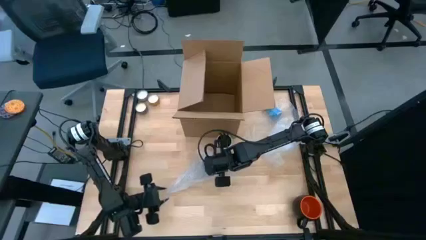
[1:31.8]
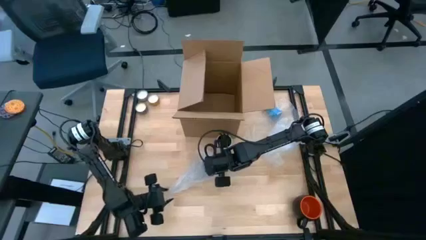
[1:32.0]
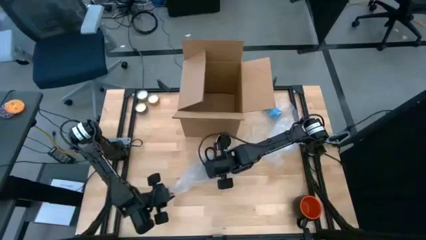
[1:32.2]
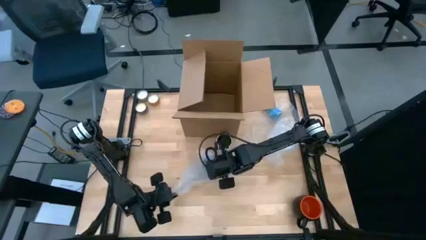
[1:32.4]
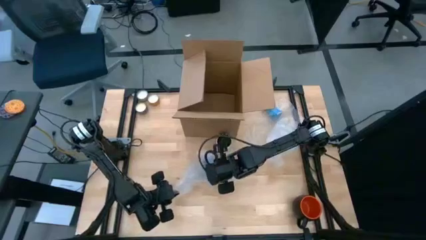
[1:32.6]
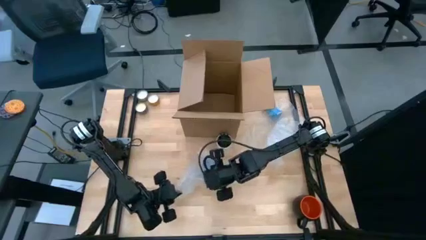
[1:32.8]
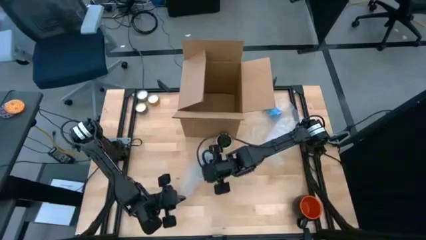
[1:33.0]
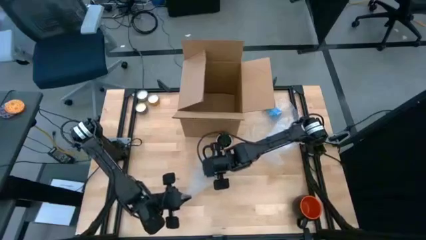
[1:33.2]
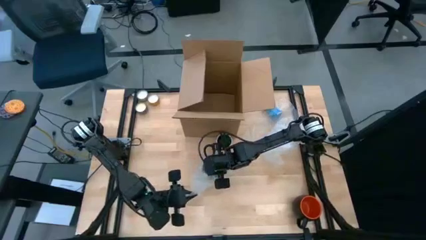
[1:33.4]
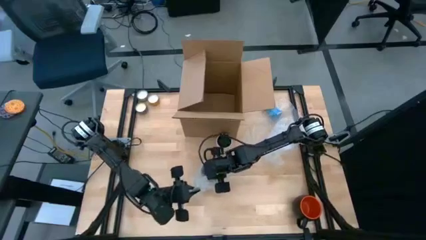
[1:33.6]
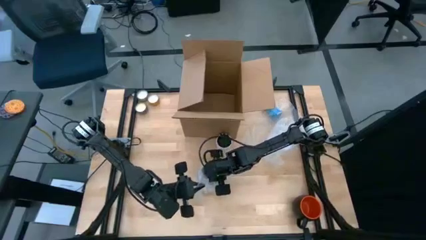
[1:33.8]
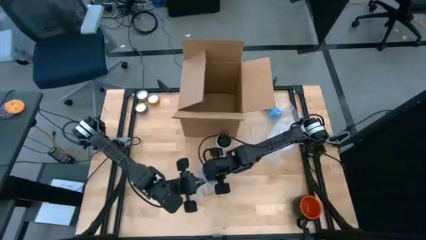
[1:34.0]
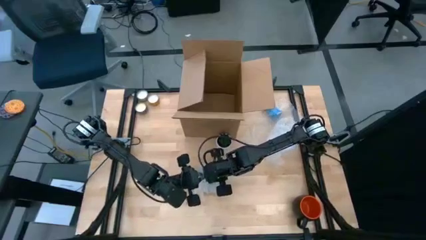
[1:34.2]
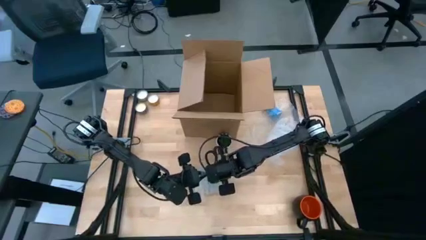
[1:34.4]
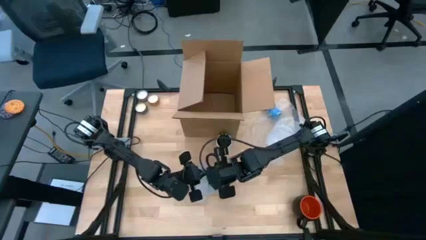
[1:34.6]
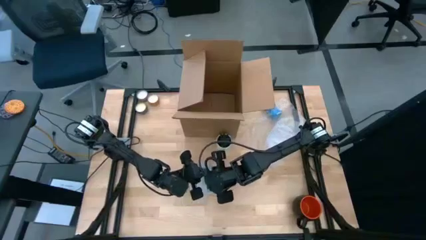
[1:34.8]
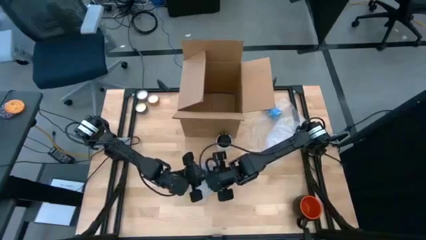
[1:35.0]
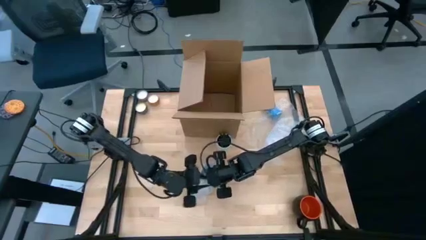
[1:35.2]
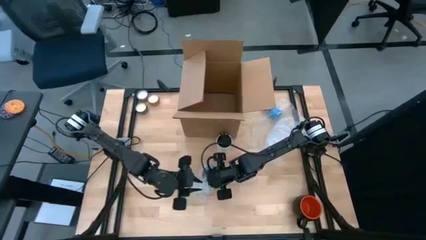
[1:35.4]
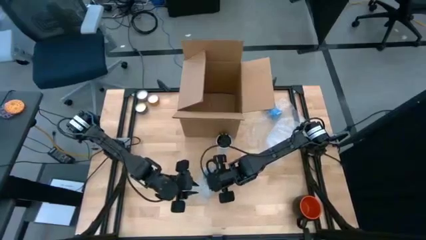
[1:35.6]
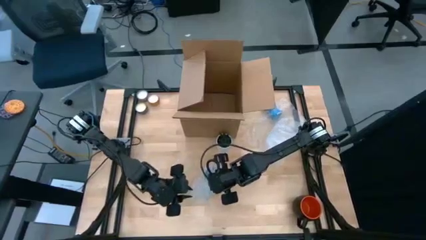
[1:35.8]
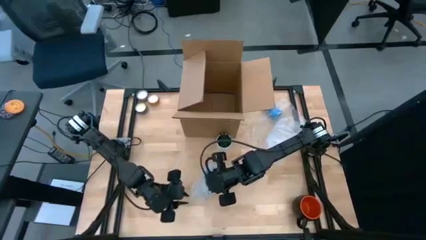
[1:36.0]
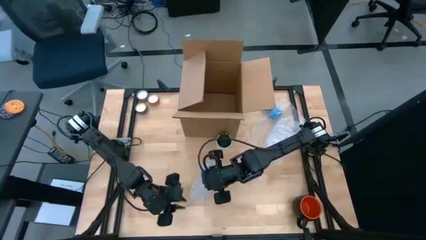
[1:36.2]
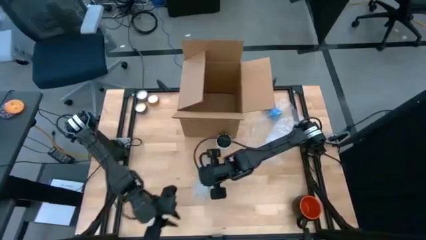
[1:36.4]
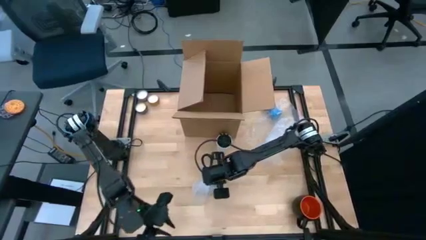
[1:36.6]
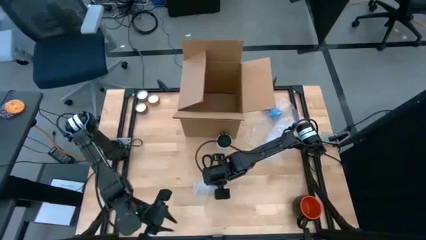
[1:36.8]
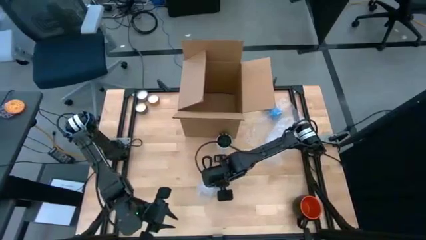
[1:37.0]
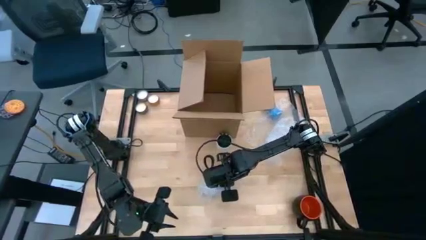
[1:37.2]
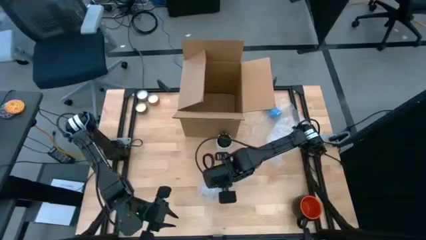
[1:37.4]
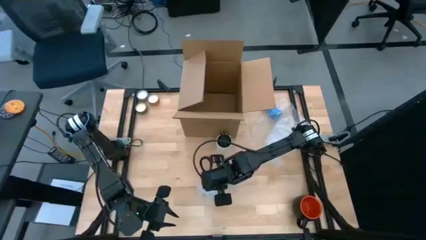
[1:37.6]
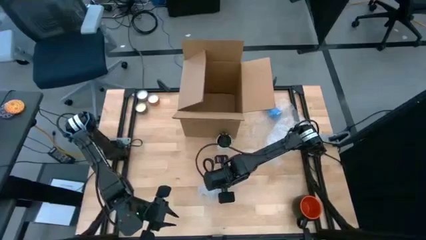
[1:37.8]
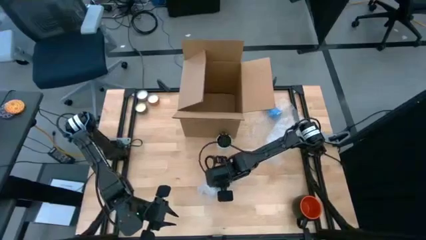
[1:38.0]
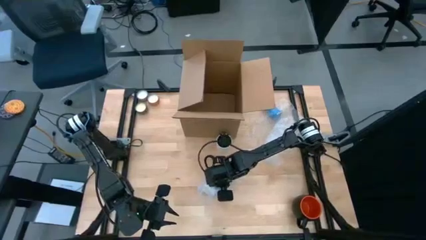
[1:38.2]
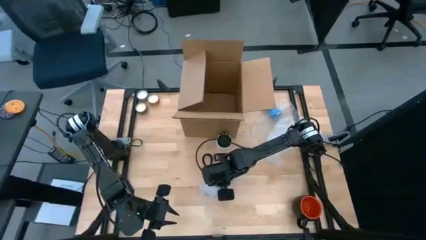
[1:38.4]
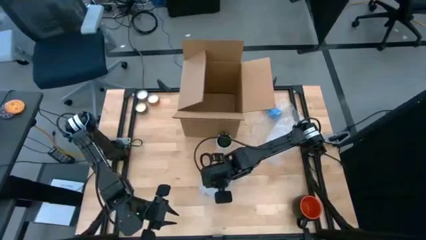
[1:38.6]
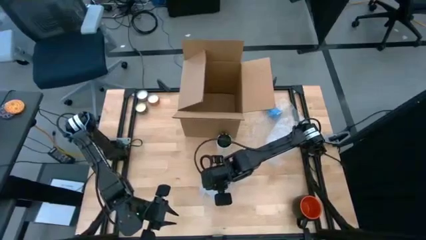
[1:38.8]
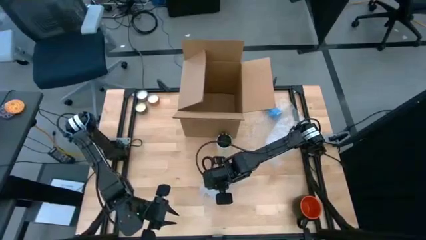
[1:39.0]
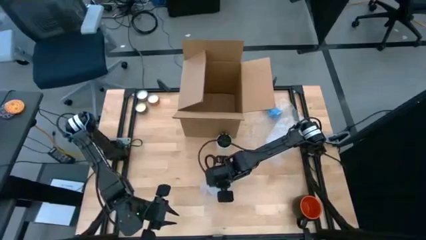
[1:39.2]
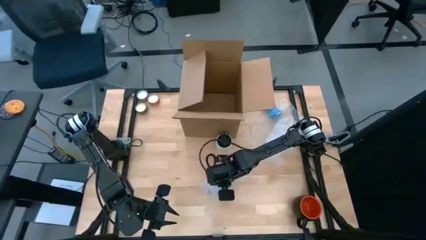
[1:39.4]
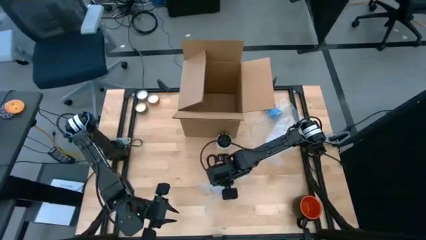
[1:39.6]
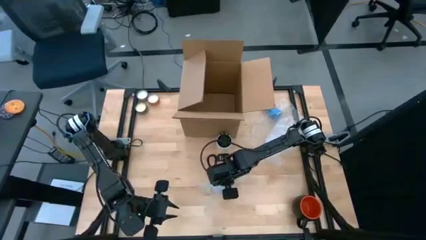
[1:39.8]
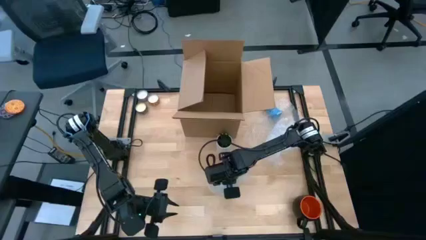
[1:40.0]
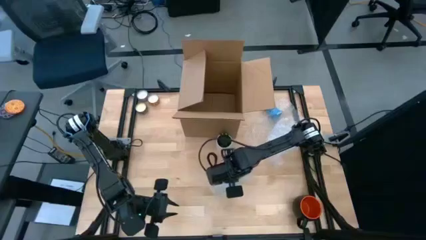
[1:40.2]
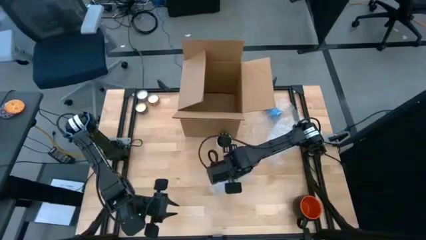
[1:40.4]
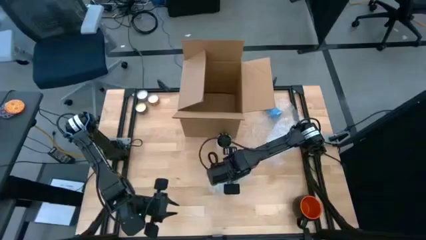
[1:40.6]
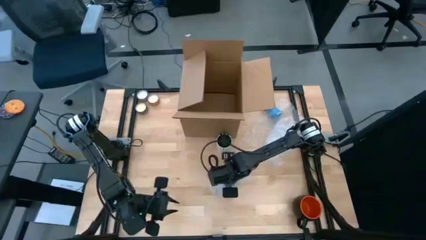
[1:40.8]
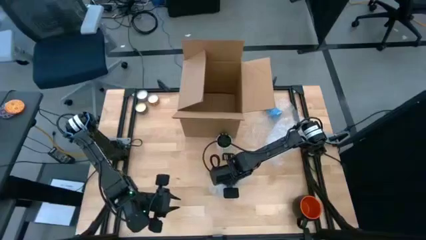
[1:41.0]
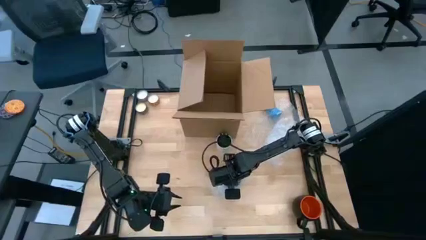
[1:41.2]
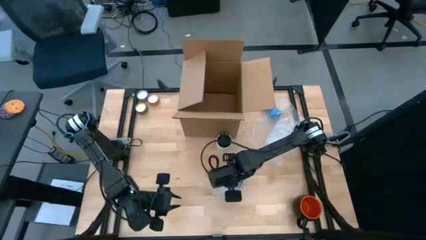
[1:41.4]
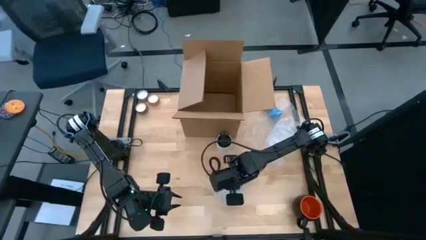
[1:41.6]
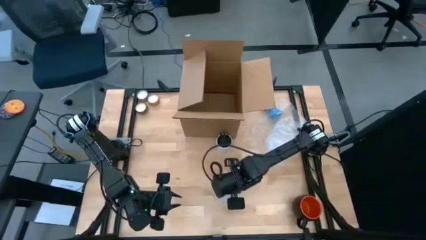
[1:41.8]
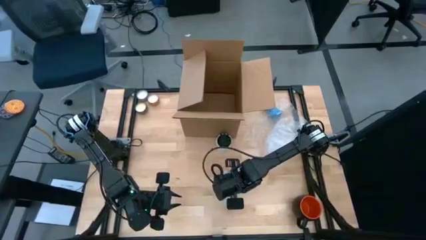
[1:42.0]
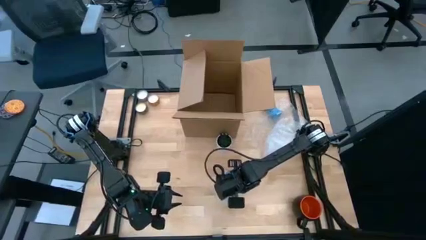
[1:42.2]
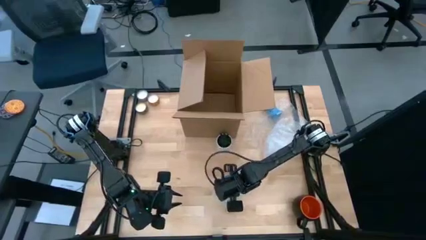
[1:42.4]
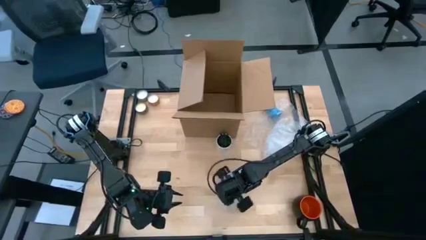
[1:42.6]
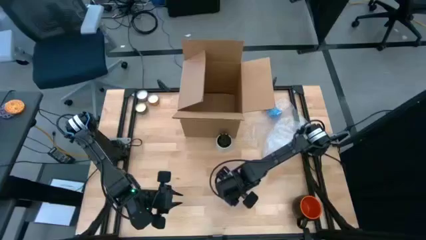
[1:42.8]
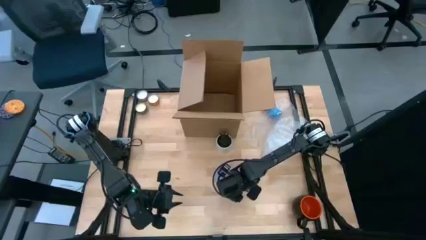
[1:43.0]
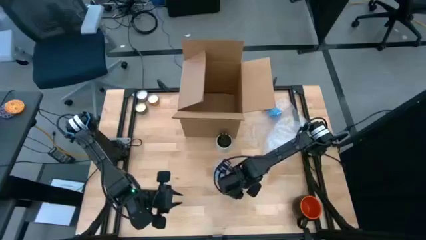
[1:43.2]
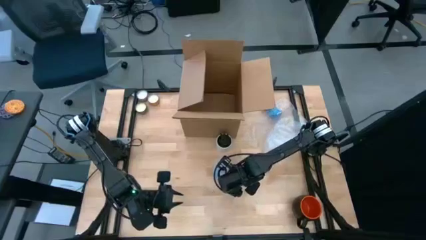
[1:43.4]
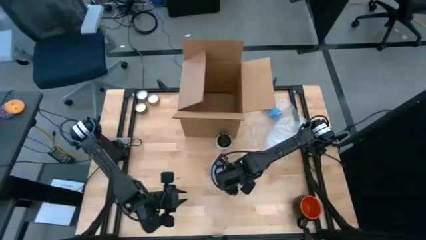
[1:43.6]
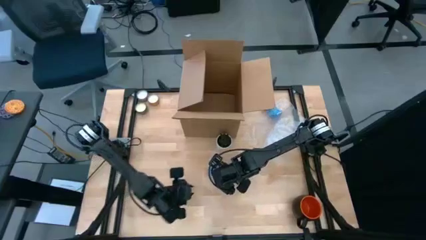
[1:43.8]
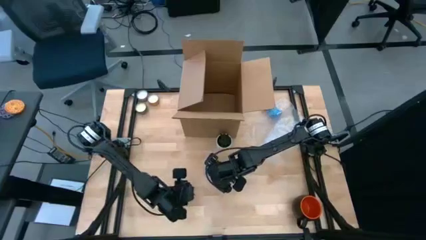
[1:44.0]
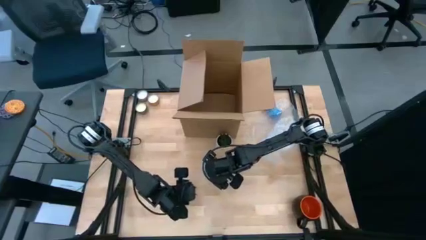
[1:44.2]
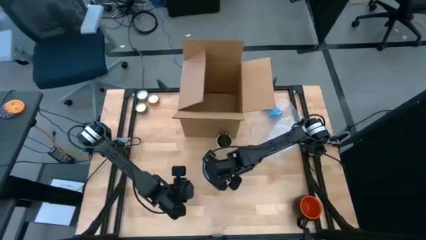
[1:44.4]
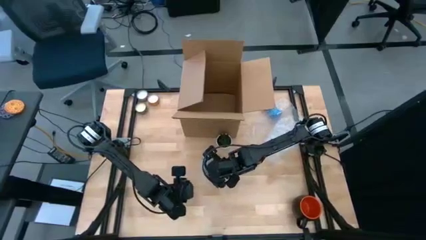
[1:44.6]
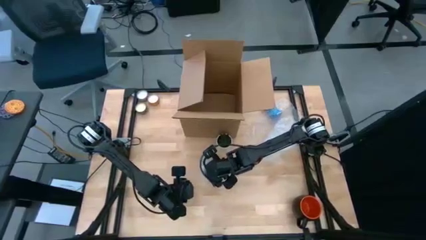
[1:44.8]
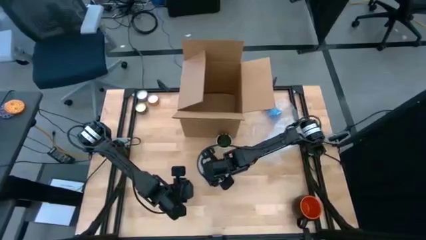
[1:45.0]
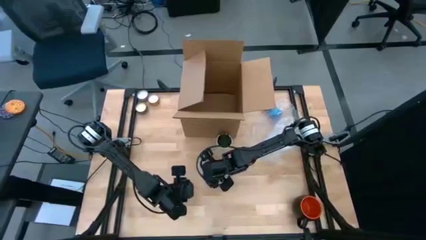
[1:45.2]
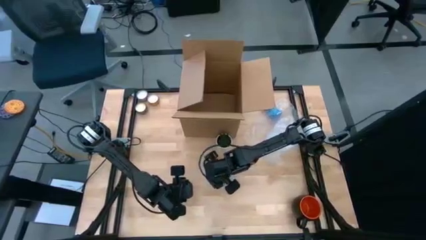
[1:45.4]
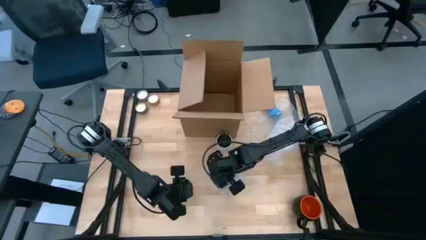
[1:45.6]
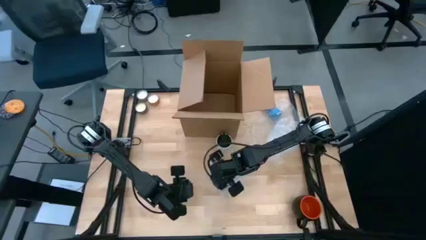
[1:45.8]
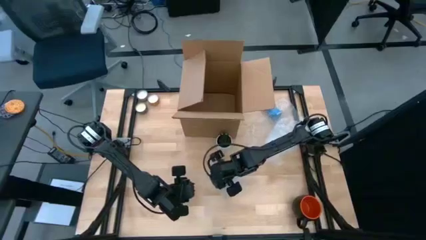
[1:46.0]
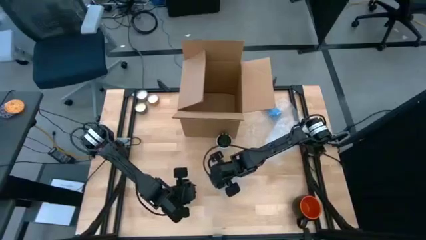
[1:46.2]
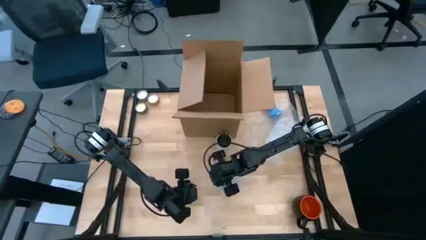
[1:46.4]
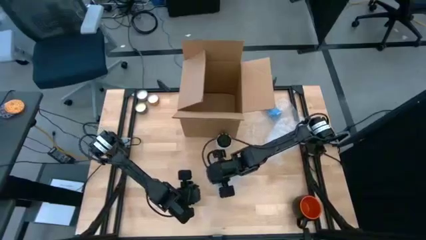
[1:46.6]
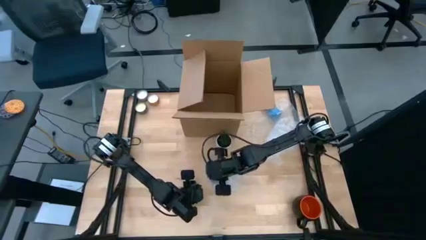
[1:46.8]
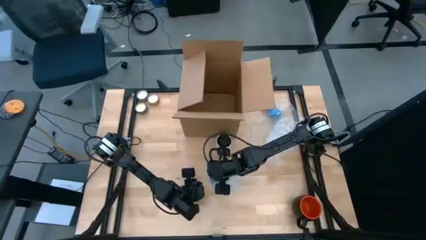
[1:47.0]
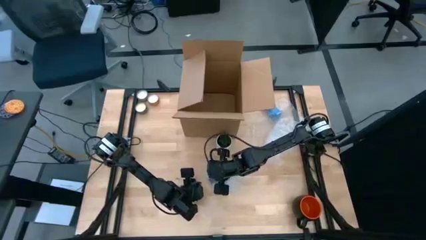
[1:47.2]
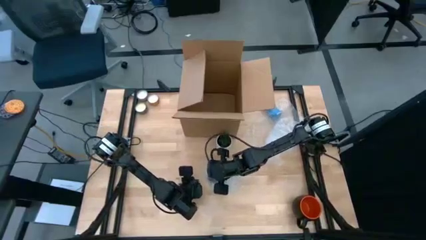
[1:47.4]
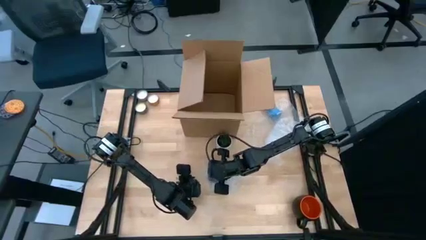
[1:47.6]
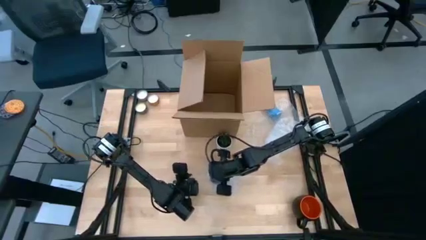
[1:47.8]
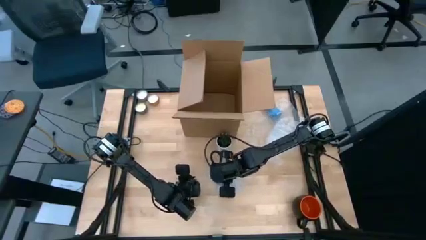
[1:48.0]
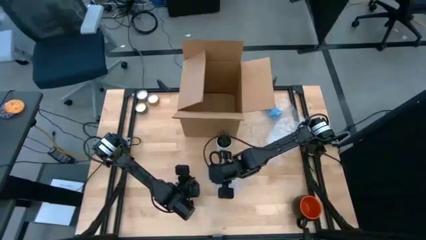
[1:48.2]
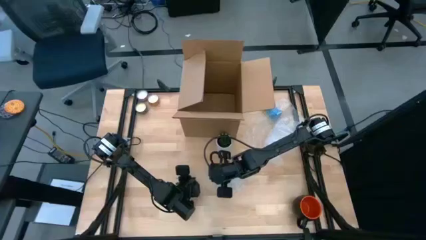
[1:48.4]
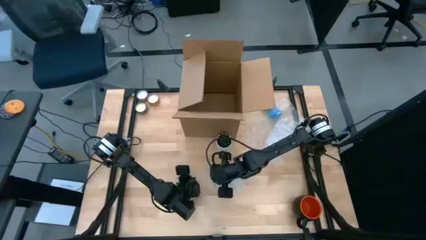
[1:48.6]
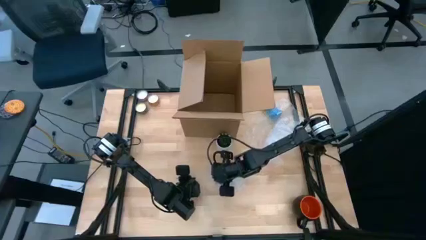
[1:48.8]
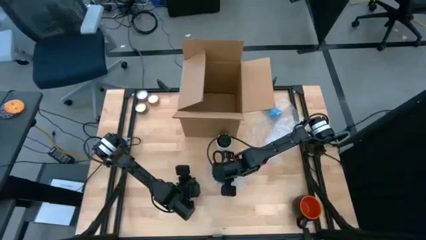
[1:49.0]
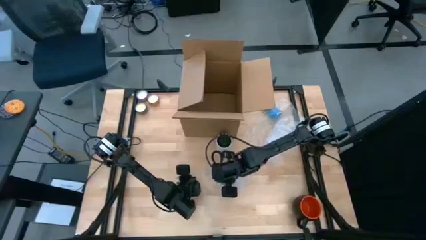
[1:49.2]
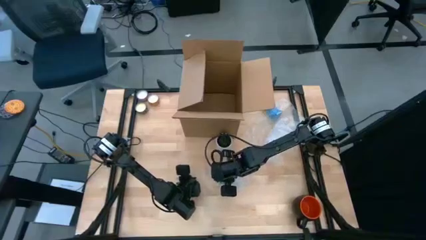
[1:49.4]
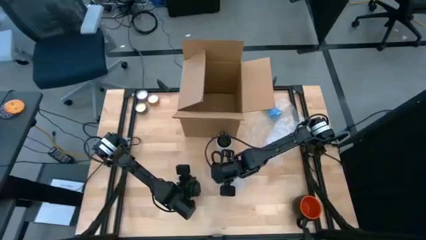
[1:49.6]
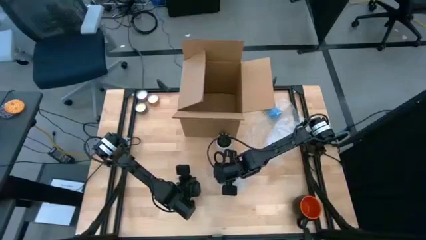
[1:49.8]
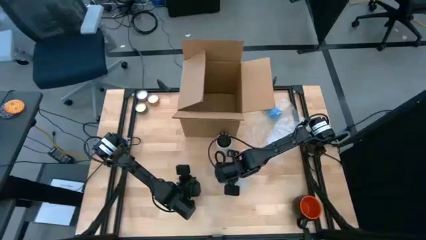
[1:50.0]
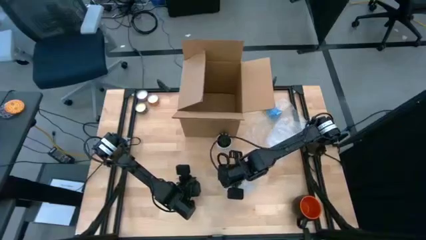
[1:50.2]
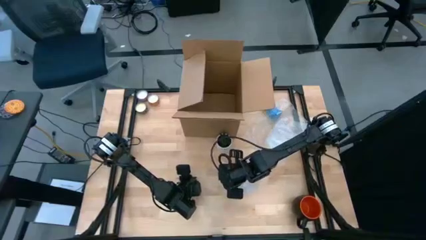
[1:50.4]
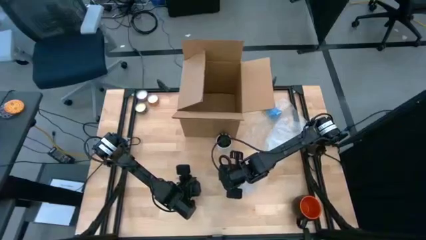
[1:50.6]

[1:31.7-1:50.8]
Task: wrap mug
Wrap the blue cup with the transparent bubble wrap
